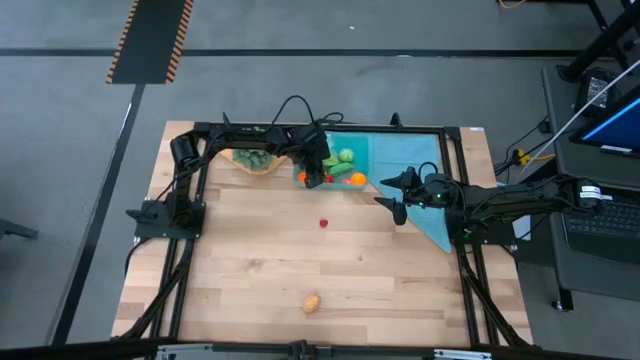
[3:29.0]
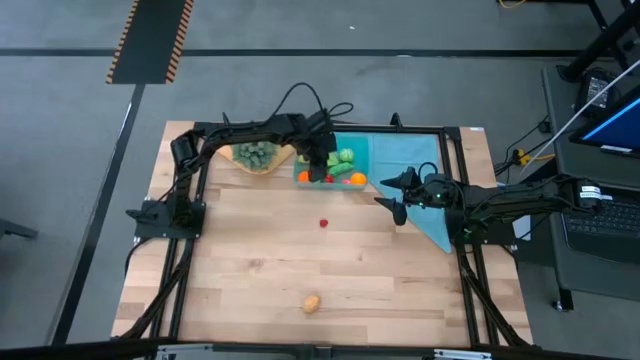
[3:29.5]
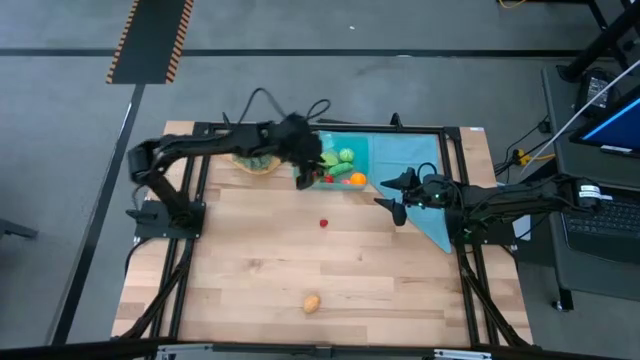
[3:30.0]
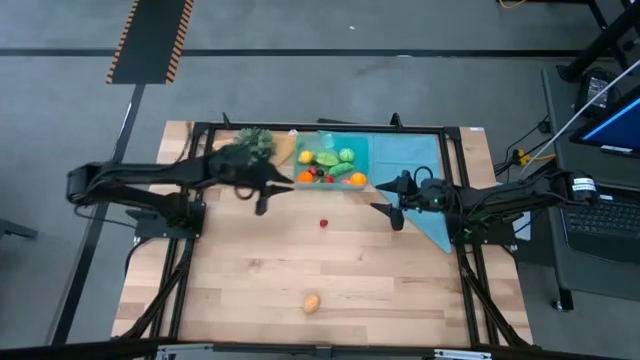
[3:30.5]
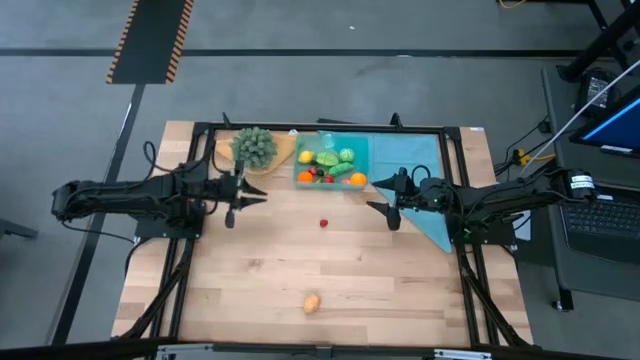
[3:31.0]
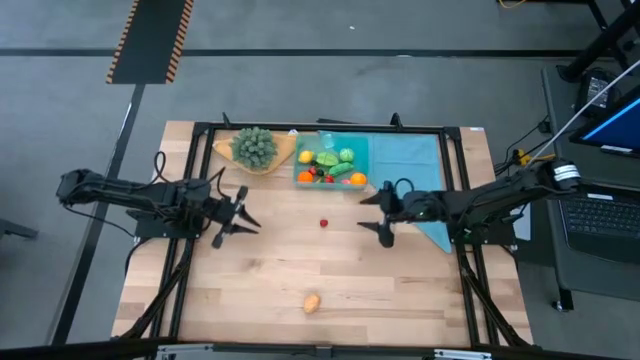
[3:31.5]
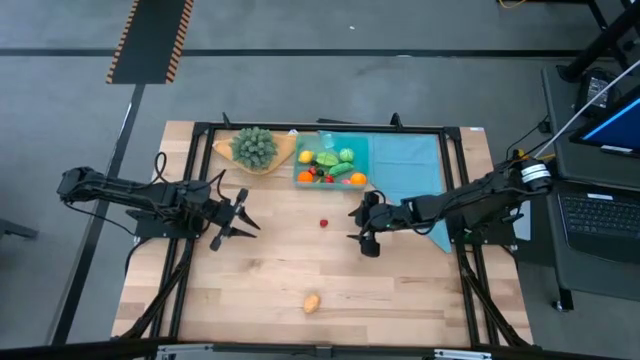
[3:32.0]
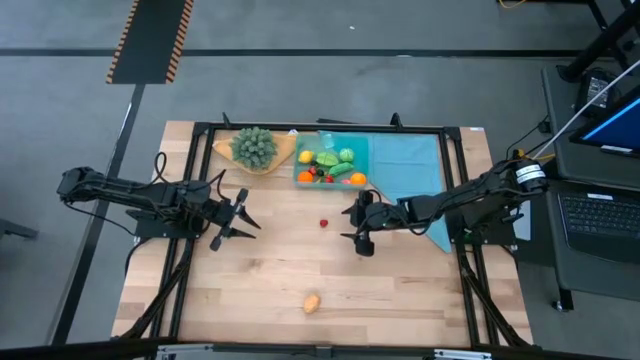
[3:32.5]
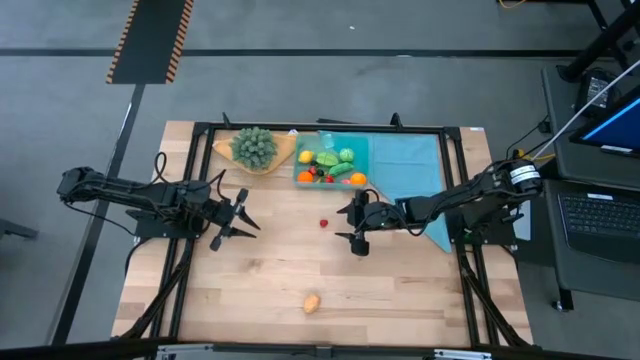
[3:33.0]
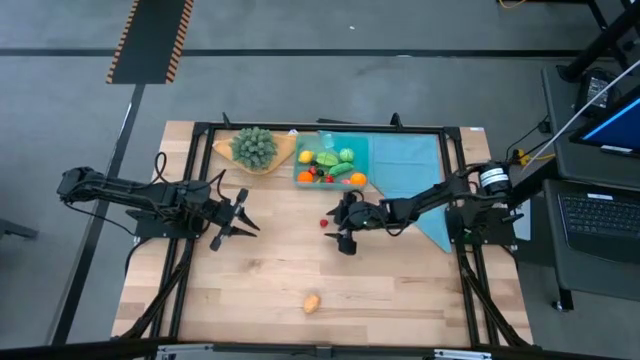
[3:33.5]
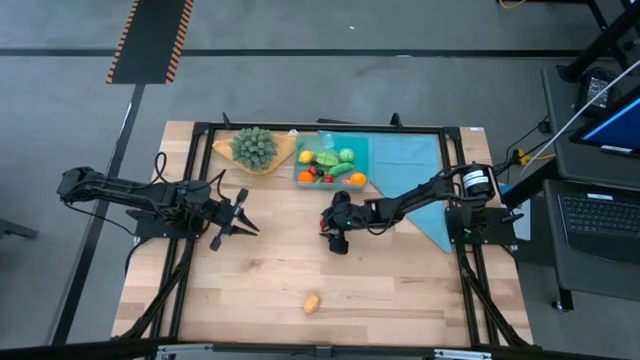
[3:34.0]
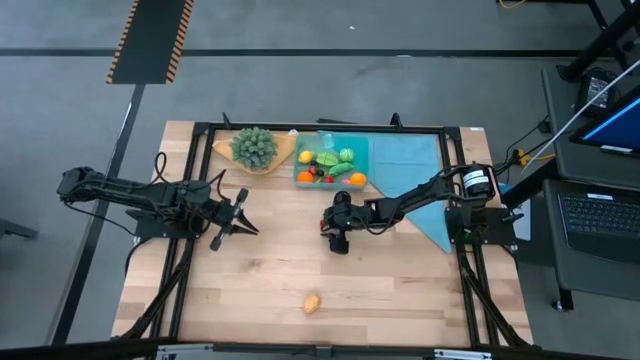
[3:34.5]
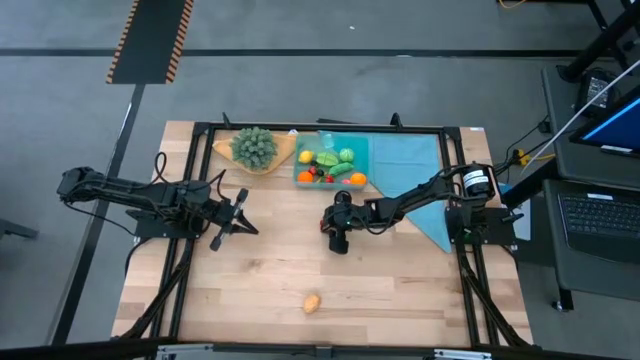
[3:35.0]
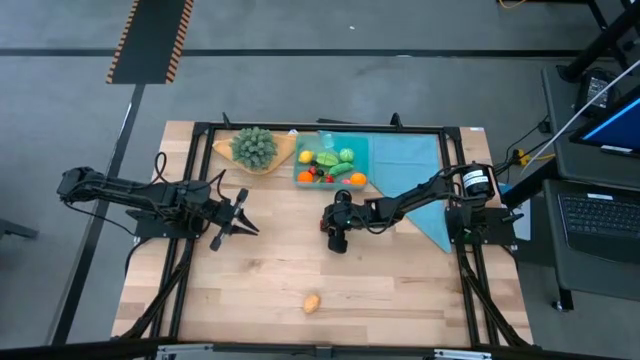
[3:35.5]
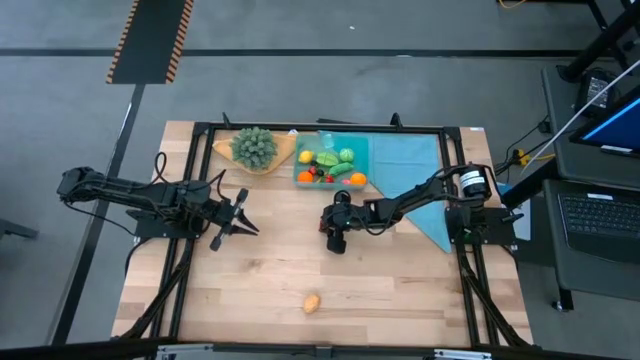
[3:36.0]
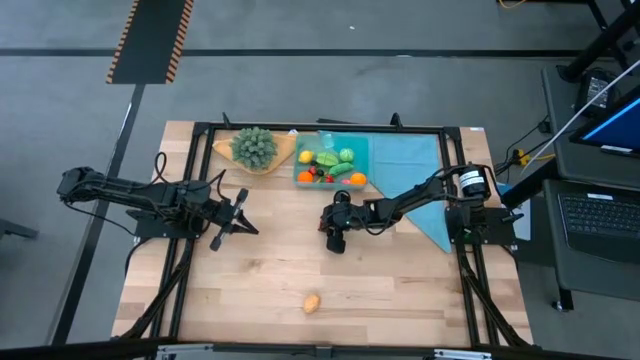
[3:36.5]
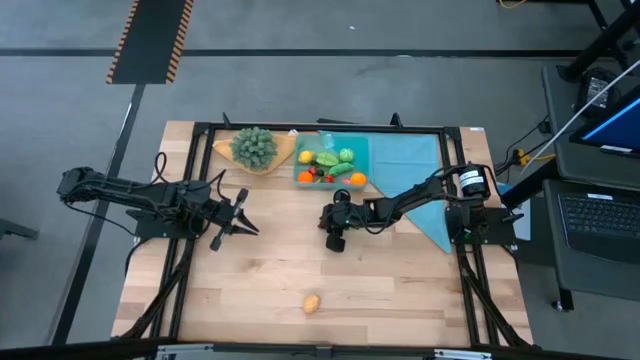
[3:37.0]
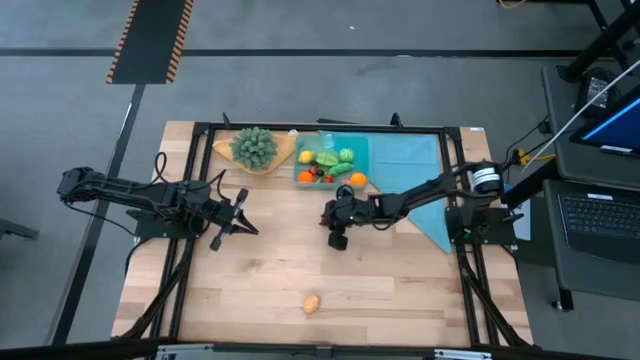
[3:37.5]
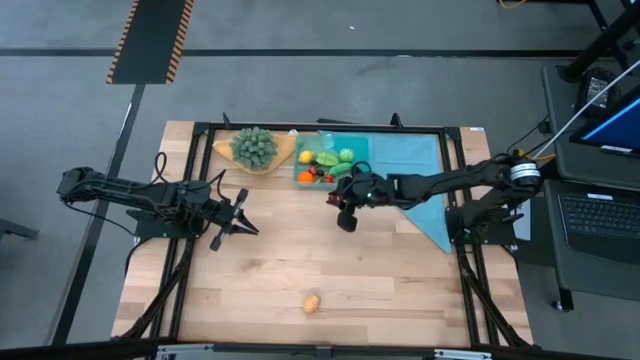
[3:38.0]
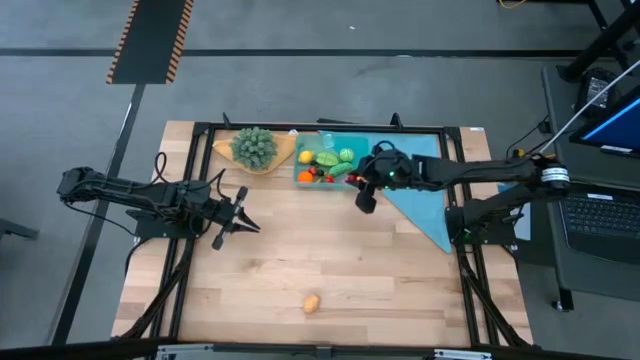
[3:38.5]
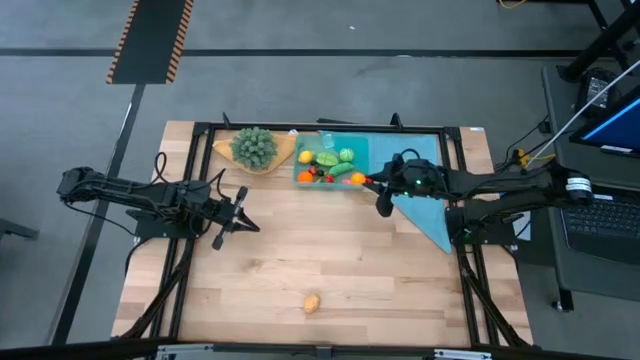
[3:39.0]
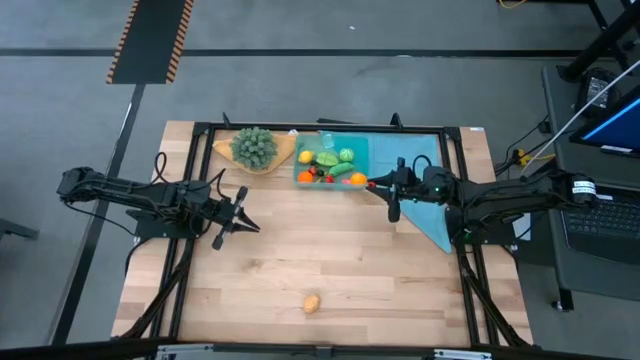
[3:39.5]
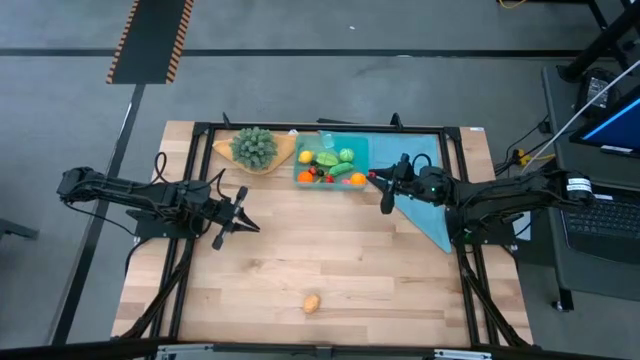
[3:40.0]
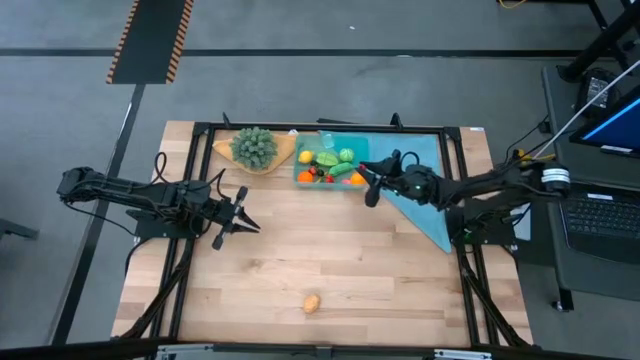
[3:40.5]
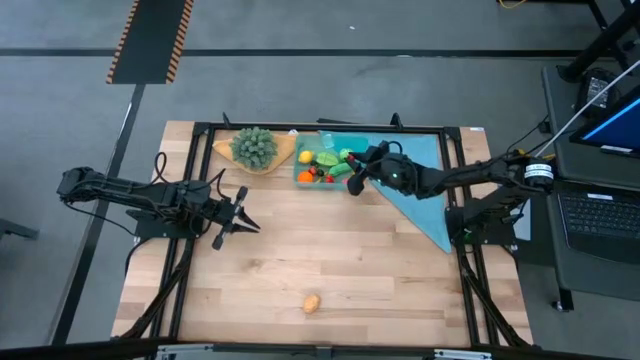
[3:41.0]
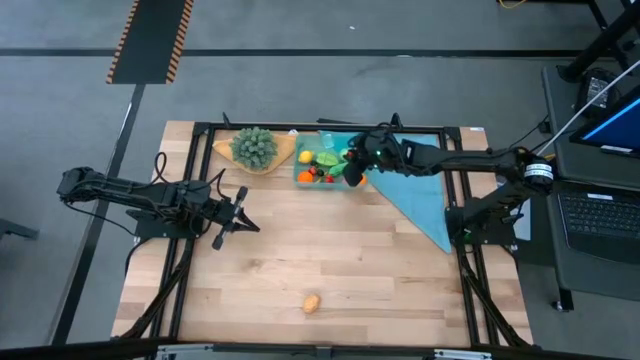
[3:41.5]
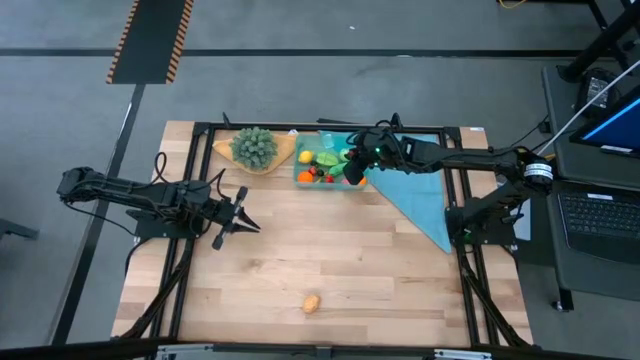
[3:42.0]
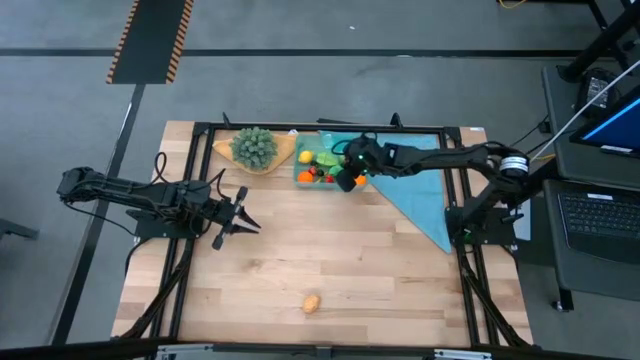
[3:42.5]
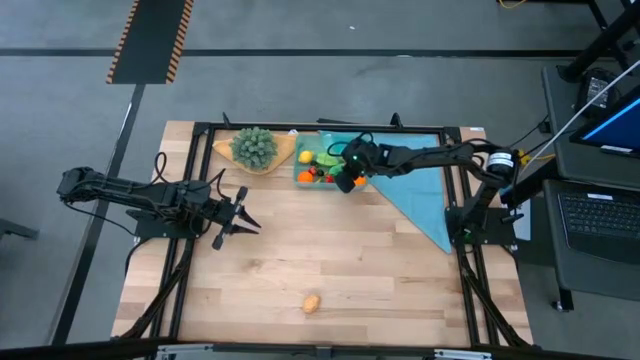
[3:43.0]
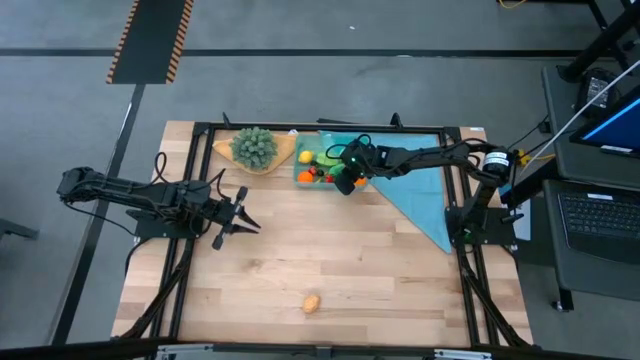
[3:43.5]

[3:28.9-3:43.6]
Task: Pick and placing Produce into tupperware
Put the raspberry into the blue bin
